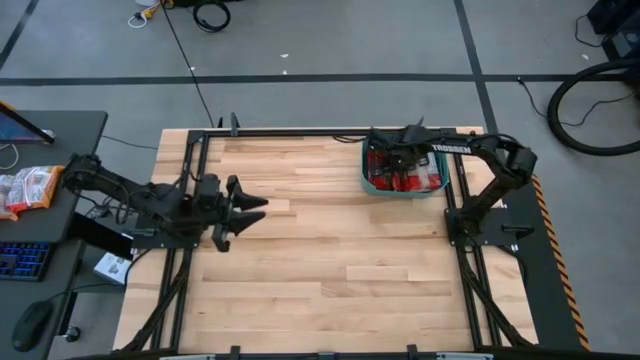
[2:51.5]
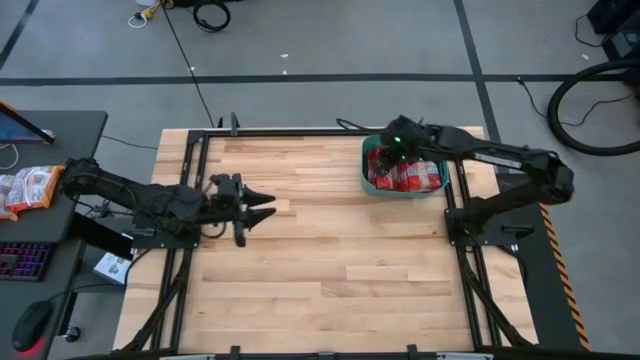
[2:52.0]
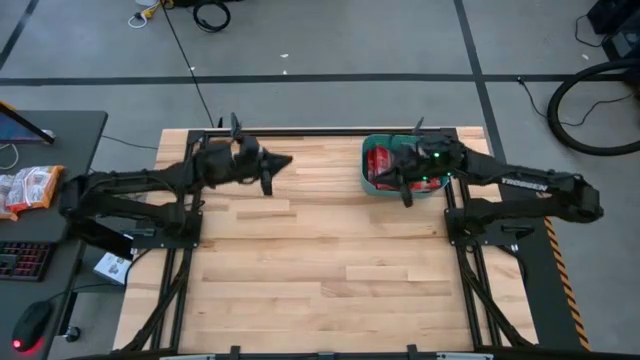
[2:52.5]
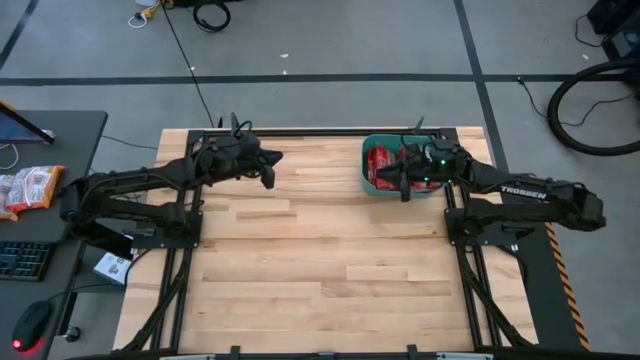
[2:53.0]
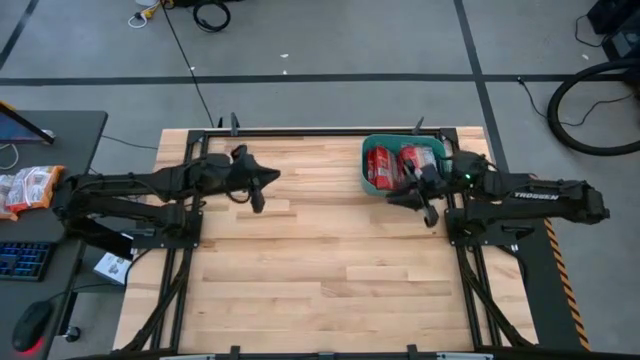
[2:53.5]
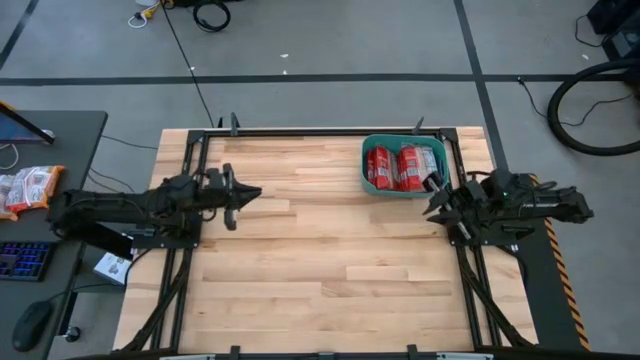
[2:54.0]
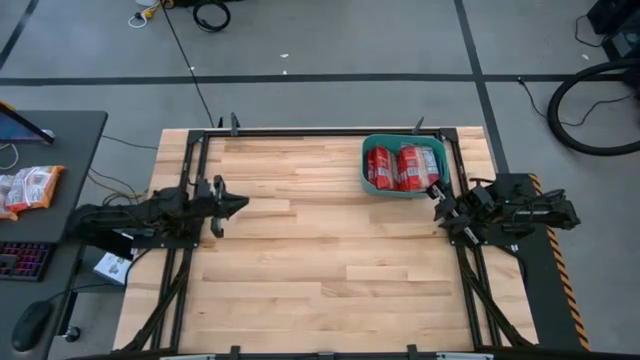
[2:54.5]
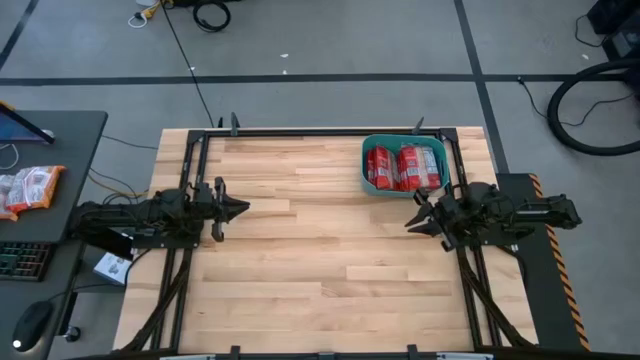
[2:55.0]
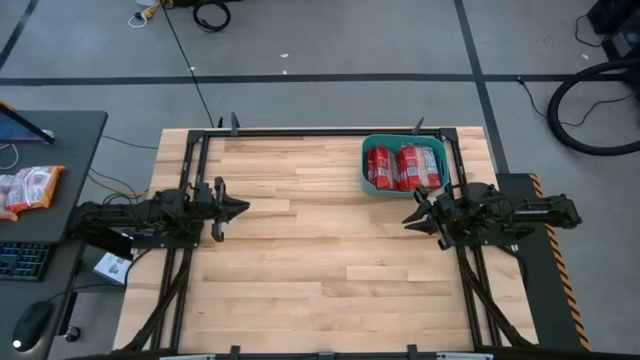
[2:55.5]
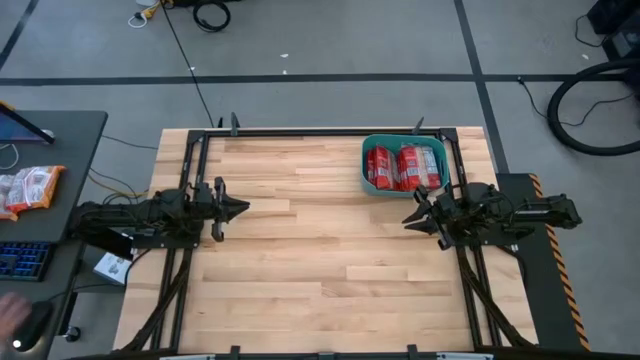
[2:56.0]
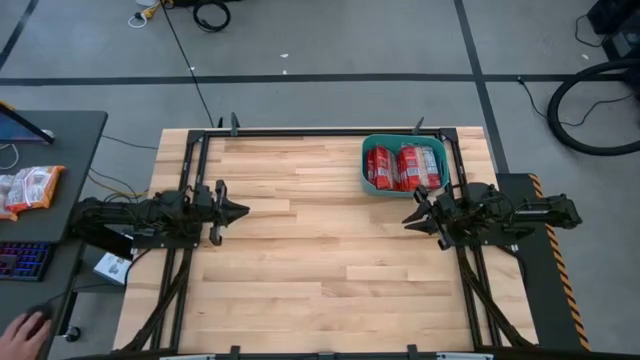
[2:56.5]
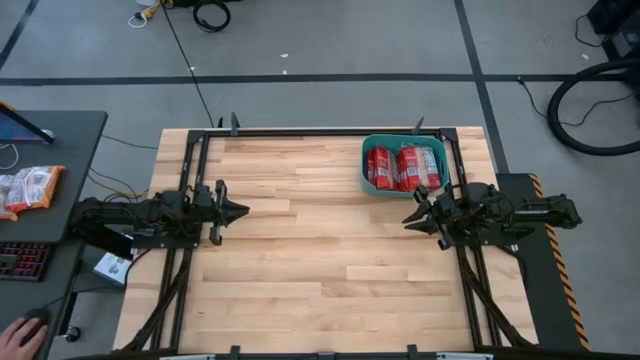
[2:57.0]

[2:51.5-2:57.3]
Task: Sort popcorn bags into baskets
Return to Home Position

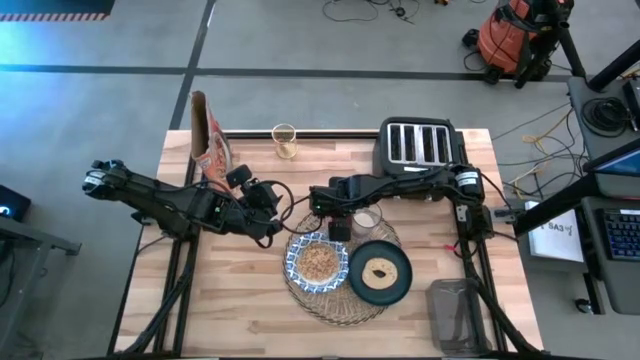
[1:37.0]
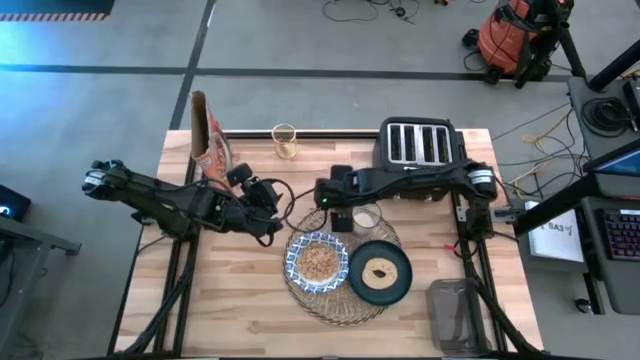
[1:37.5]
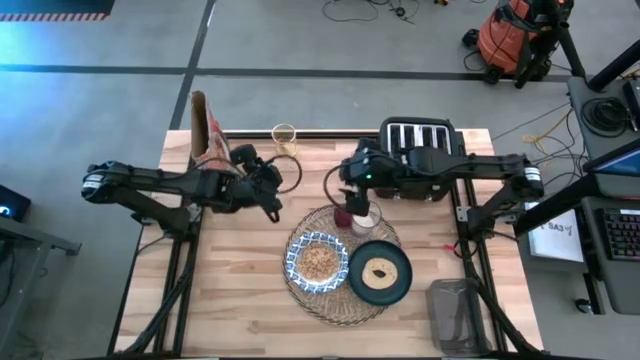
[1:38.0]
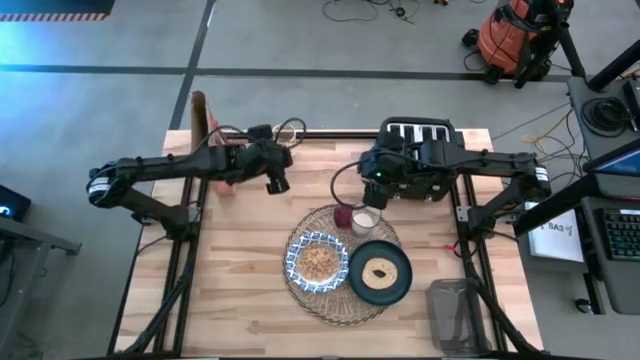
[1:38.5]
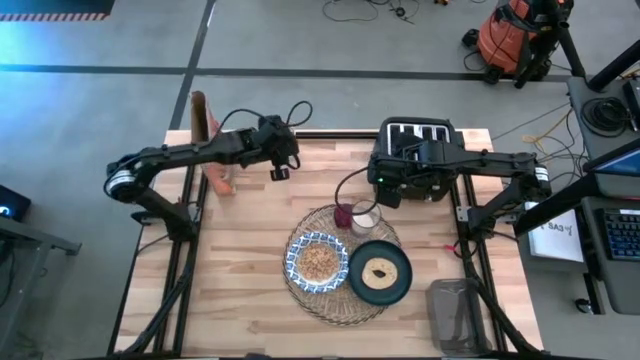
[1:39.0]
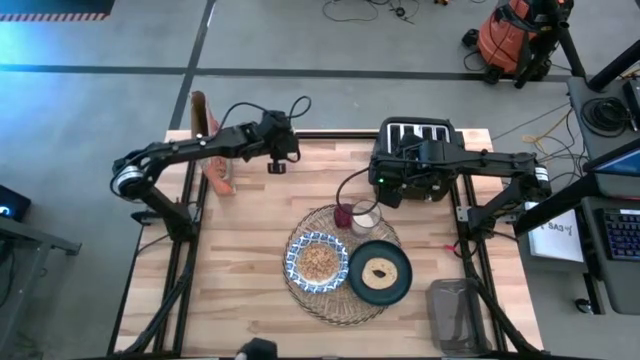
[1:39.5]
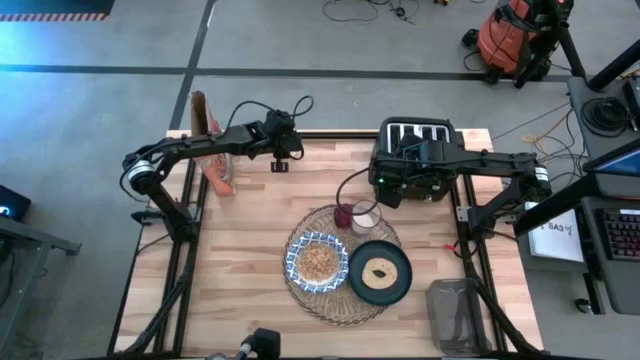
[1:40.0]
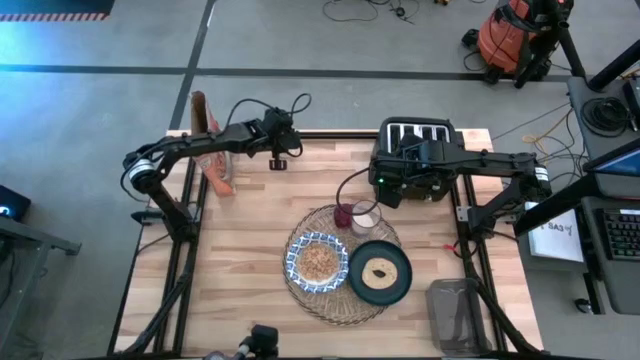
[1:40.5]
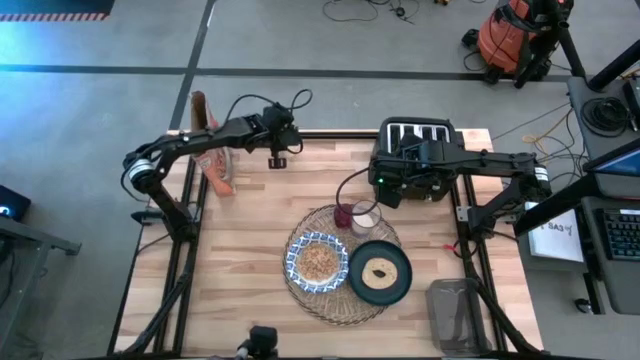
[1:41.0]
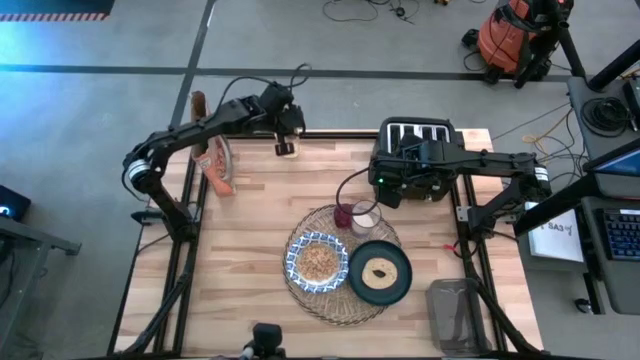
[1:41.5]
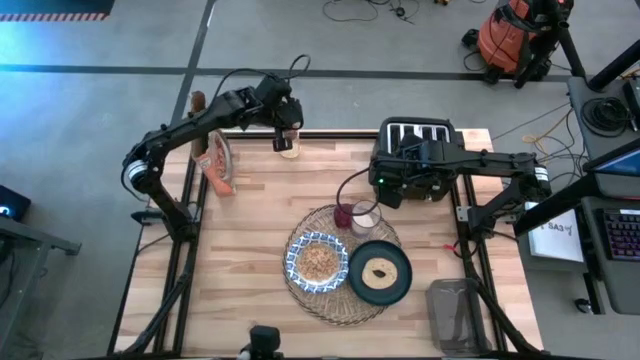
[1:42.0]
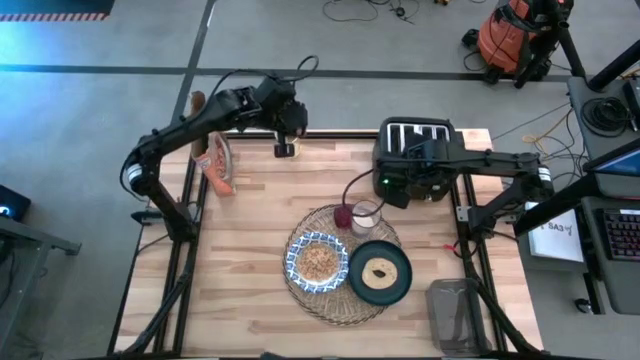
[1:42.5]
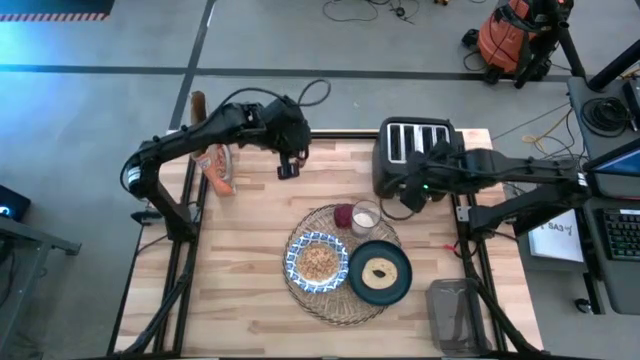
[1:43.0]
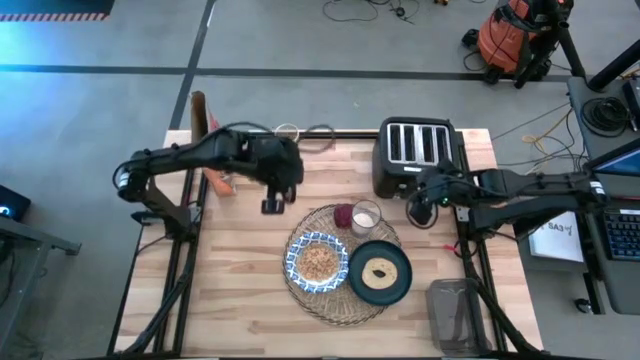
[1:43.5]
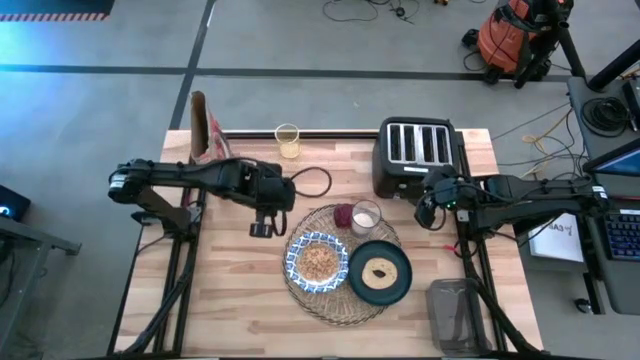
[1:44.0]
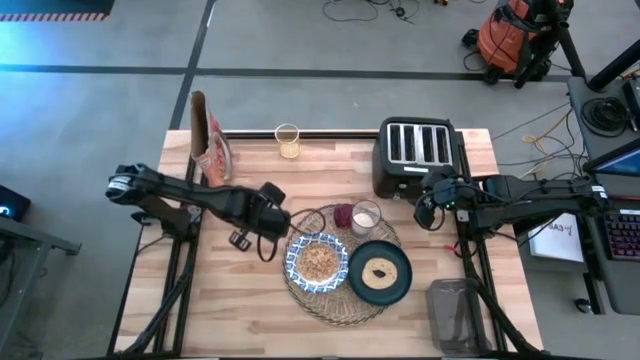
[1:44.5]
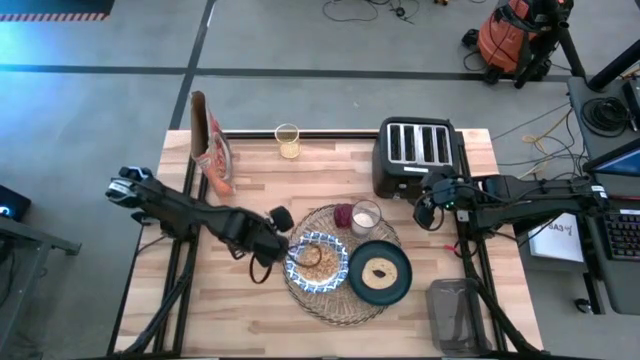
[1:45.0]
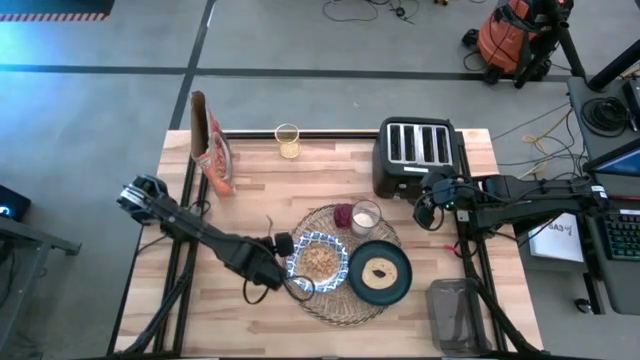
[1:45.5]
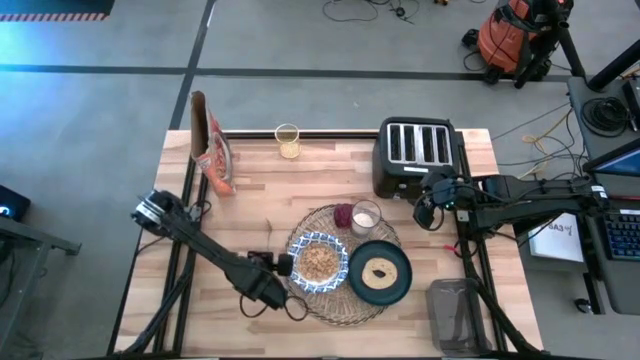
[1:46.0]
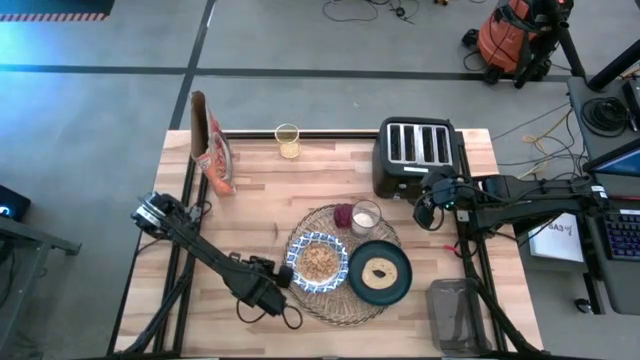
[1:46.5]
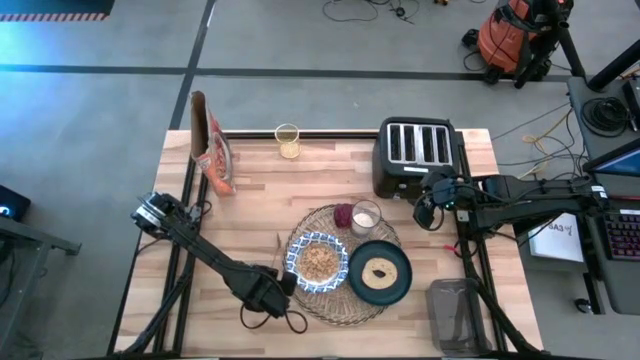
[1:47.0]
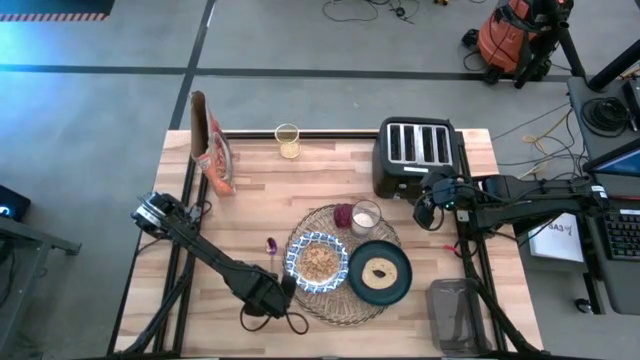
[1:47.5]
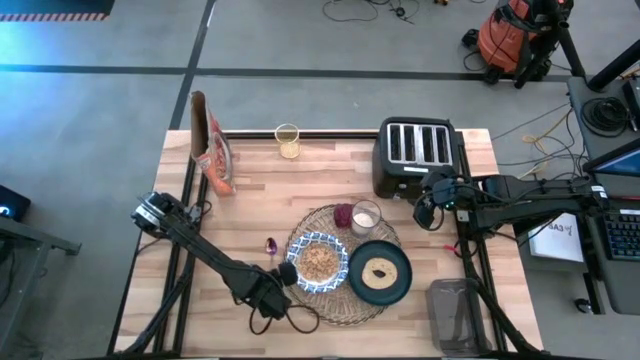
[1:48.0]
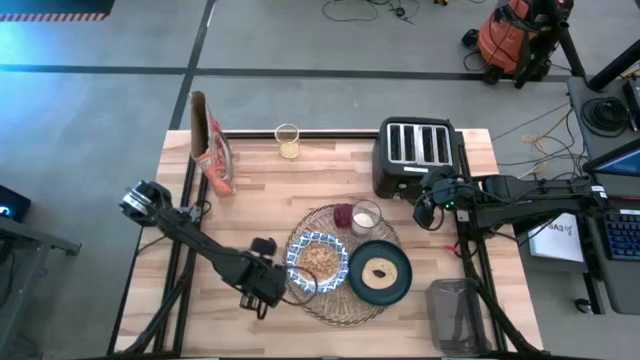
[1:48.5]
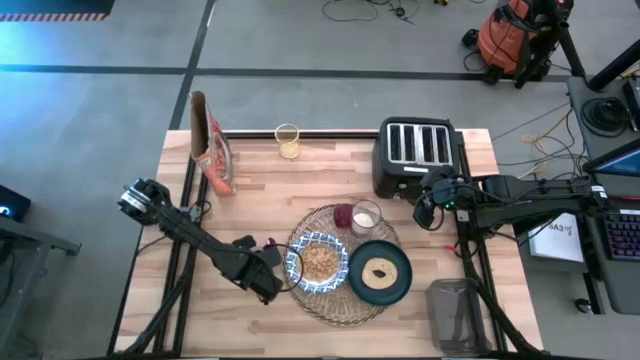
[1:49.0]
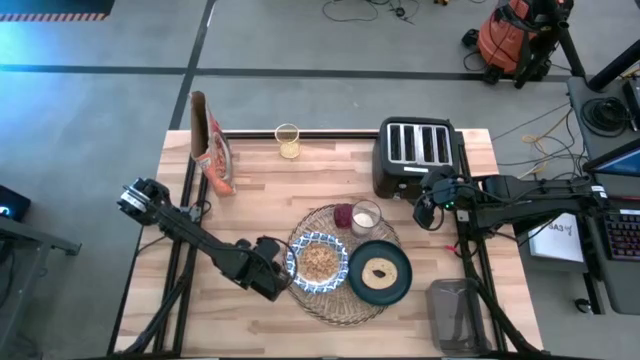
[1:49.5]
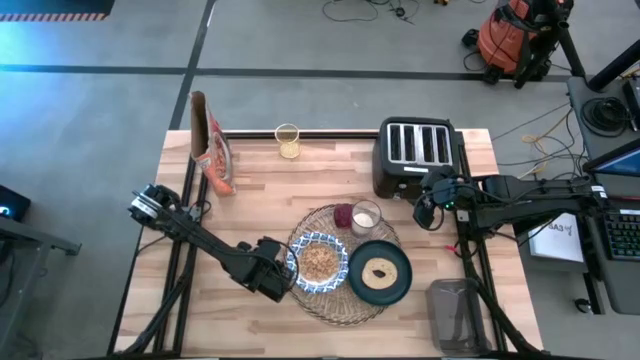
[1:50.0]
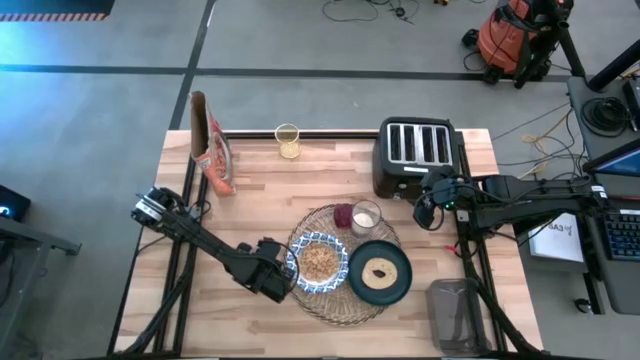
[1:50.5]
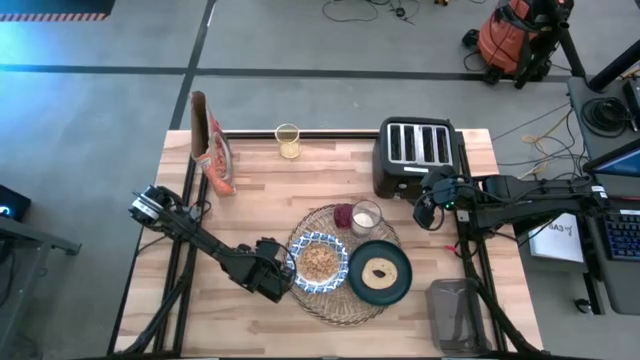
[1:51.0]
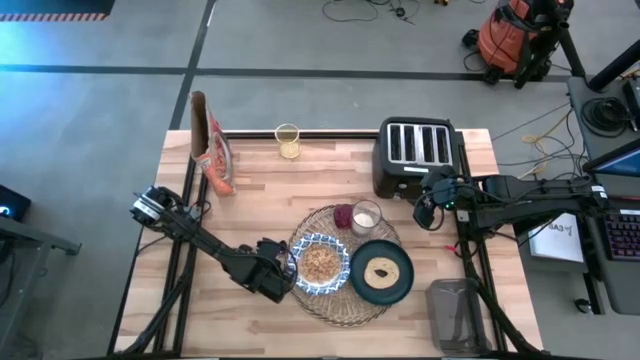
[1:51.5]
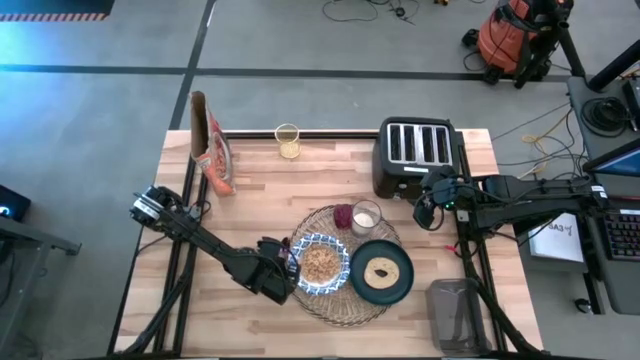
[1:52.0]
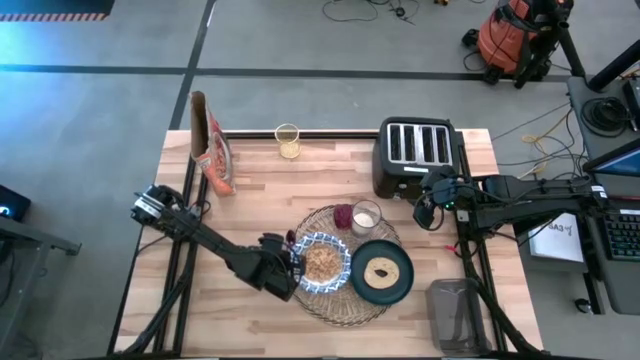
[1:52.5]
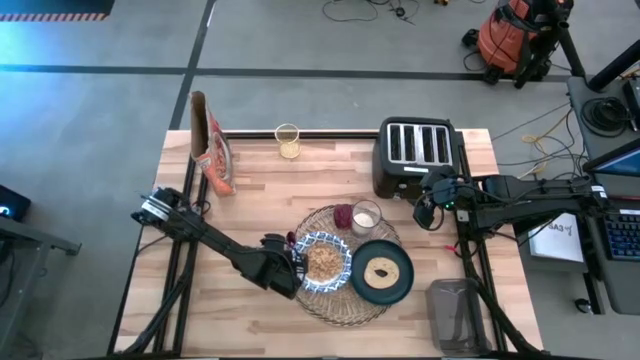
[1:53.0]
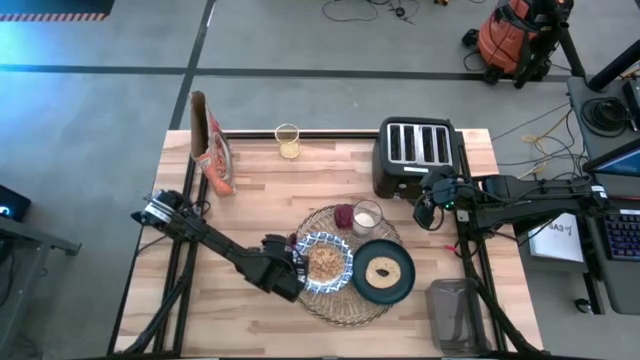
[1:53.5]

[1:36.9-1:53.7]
Task: Arrange a breakfast setting
Put the violet spoon to the left of the white patterned bowl on the brown table mat
